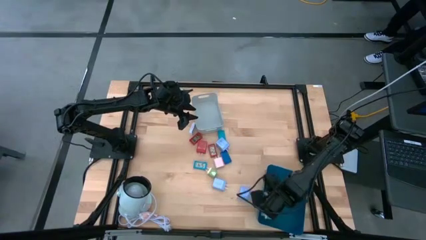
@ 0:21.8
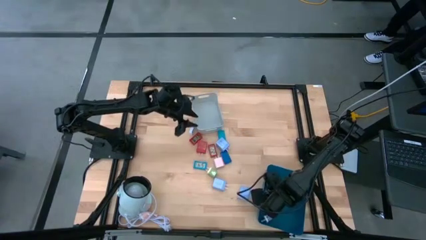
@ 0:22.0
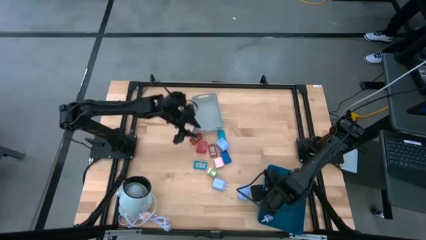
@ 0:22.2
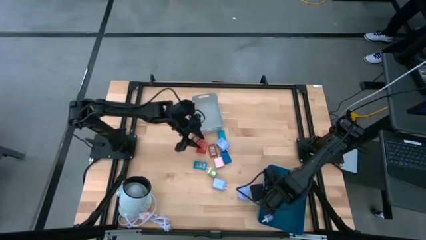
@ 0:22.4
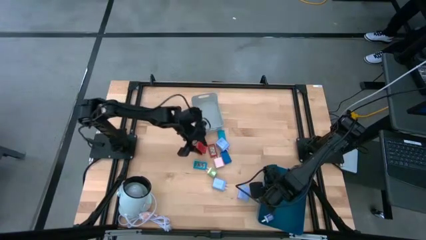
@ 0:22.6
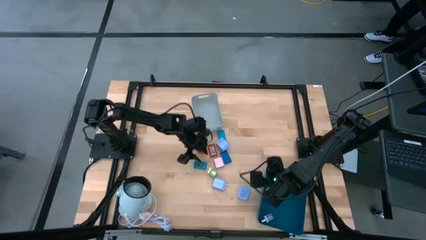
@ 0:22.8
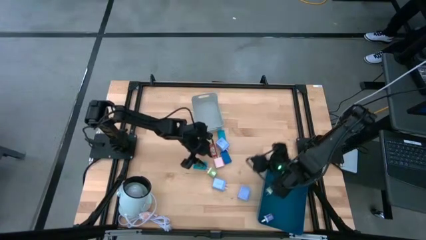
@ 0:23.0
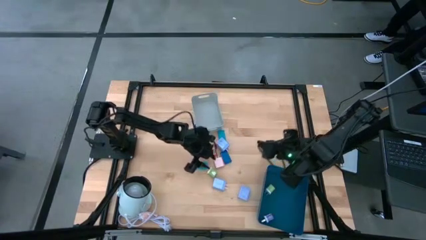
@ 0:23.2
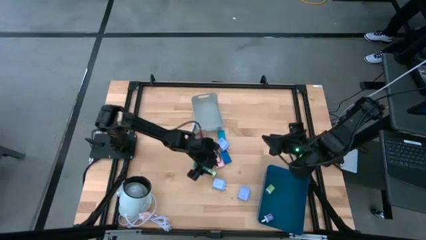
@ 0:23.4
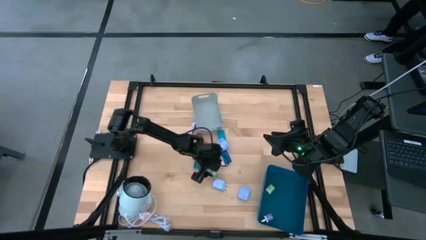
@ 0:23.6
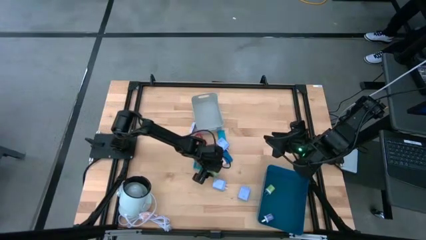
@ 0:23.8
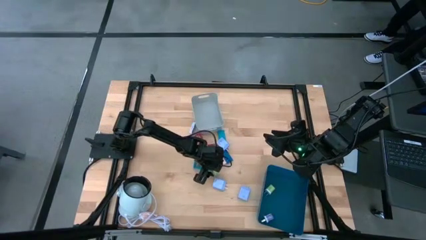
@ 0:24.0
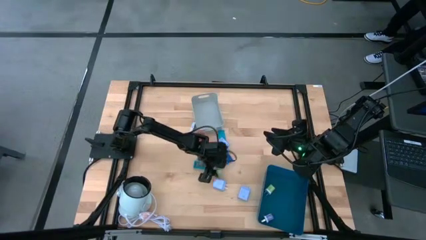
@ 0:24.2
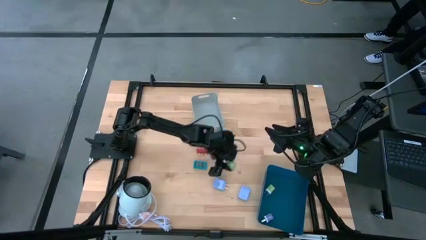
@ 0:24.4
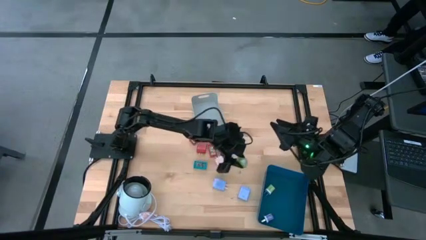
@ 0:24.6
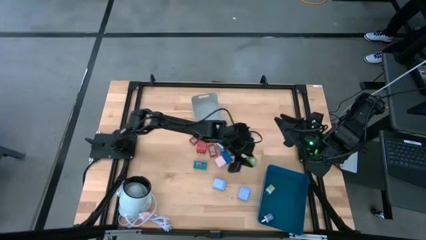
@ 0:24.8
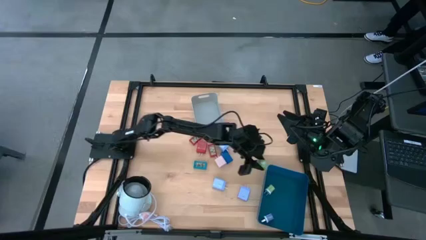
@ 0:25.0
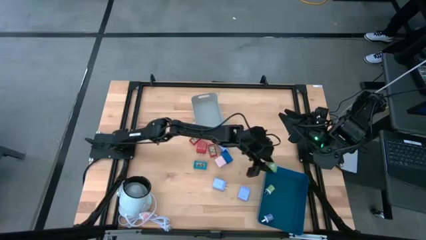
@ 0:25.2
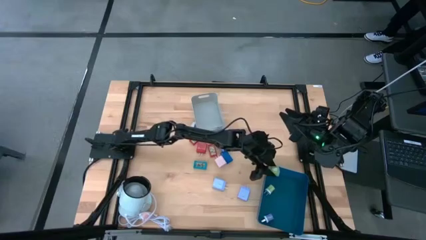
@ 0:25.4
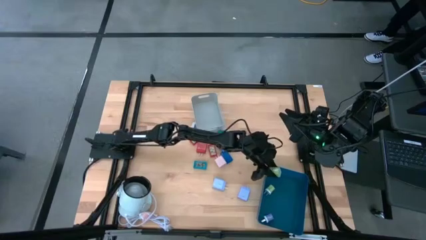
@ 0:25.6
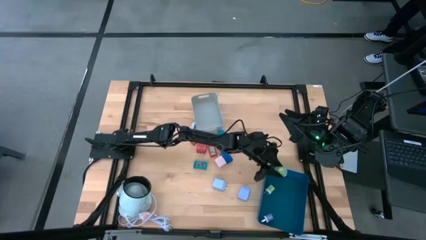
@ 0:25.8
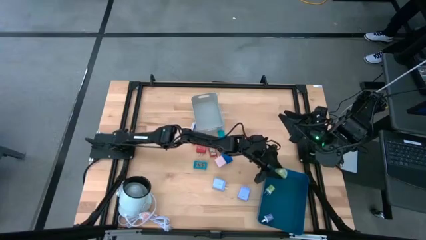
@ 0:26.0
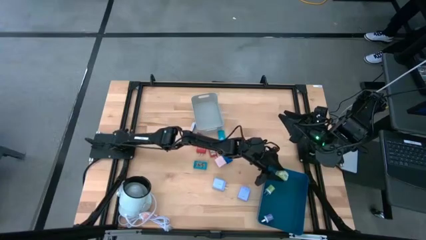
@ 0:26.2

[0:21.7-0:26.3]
Task: Pick & Place Office items
Put the green charger adapter into the blue bin

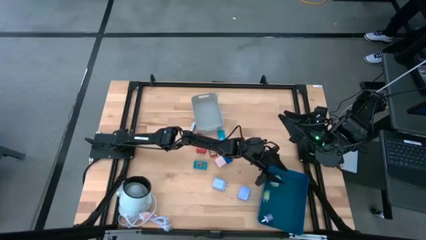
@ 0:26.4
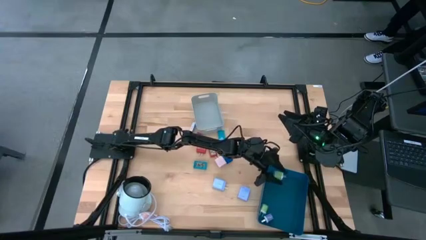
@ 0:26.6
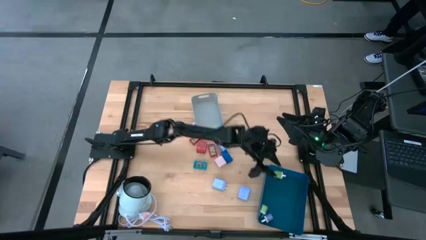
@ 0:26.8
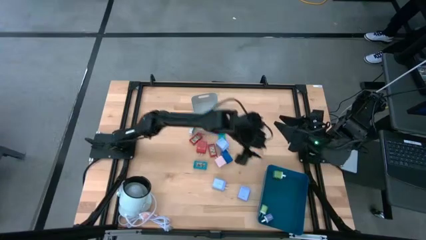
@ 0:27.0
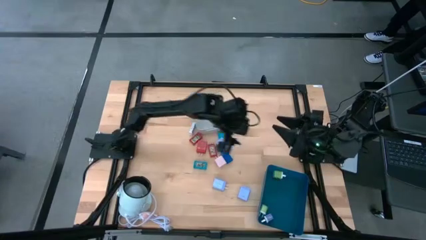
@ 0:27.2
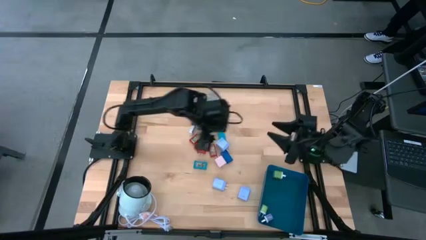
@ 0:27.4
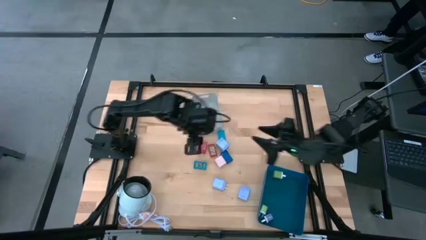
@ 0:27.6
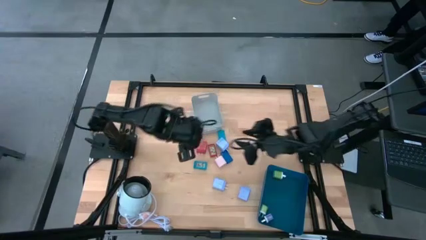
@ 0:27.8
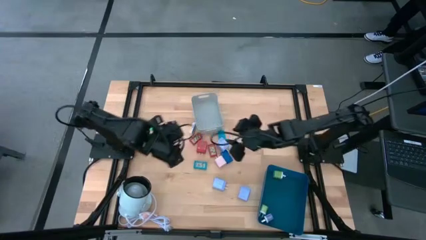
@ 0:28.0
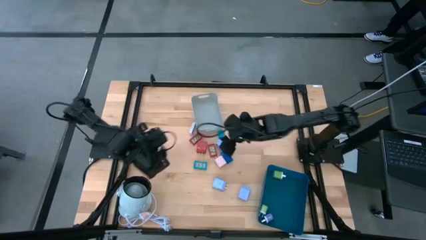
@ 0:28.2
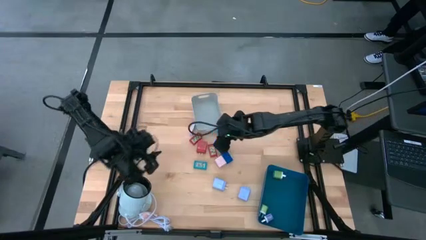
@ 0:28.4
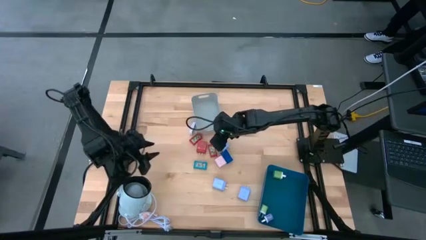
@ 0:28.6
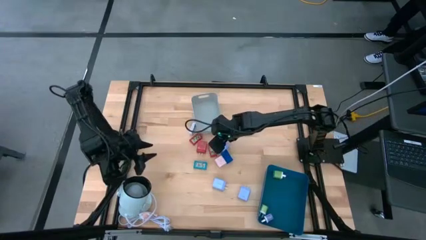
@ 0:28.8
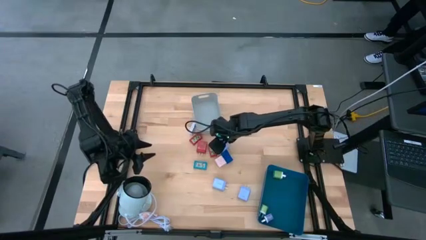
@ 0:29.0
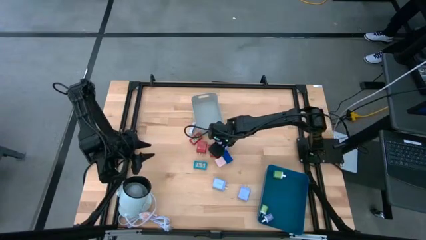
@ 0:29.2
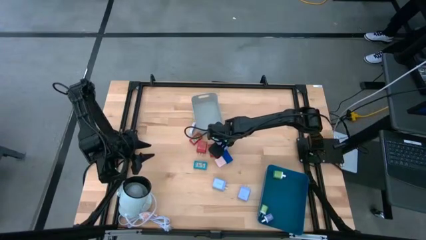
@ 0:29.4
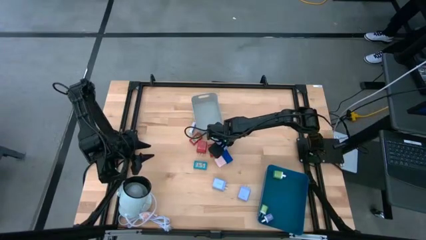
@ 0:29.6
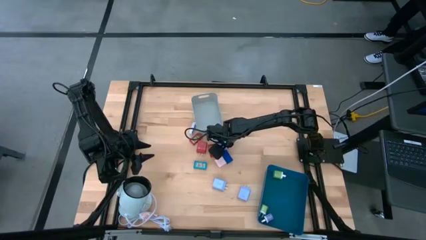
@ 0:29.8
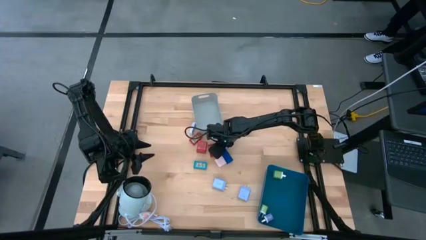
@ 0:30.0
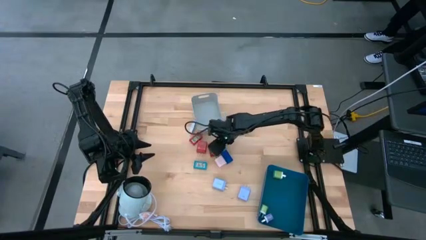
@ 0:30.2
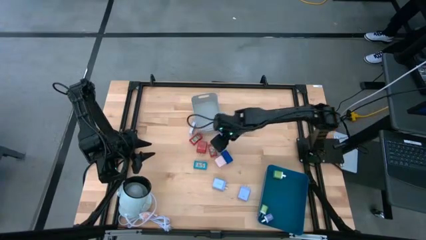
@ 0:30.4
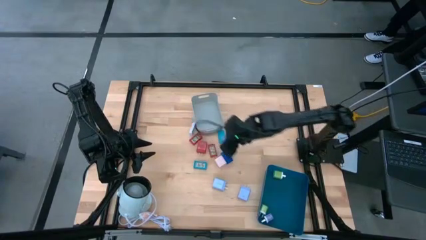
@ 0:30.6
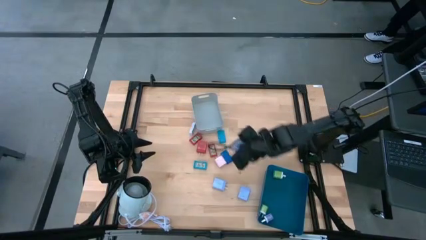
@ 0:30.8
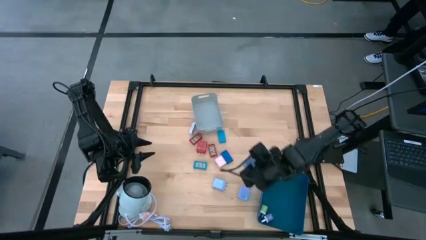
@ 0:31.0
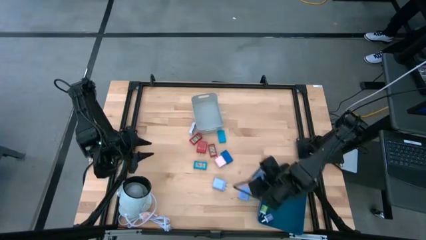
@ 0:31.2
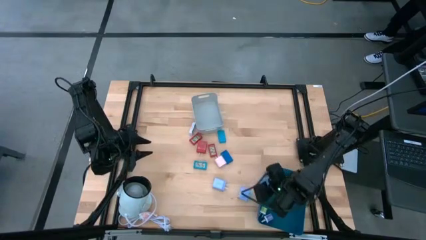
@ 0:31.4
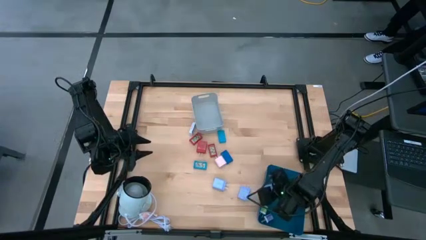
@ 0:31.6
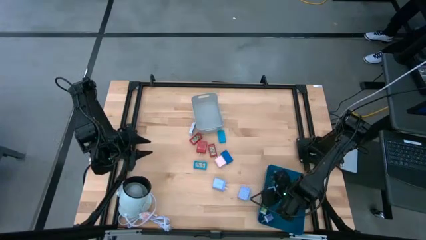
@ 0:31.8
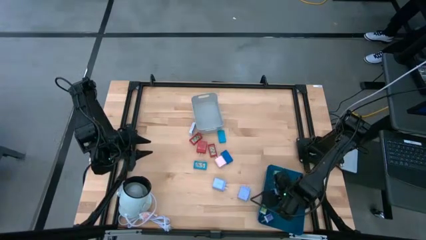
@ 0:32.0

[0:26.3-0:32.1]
Put the top blue charger adapter into the blue bin

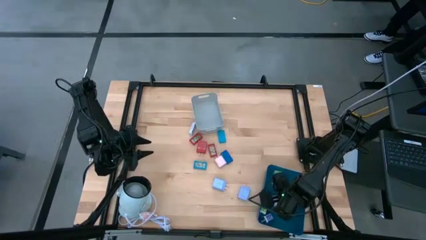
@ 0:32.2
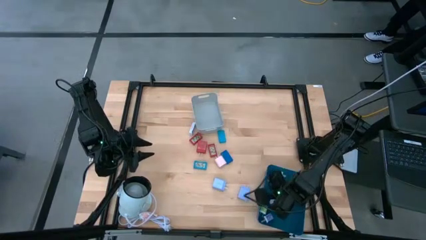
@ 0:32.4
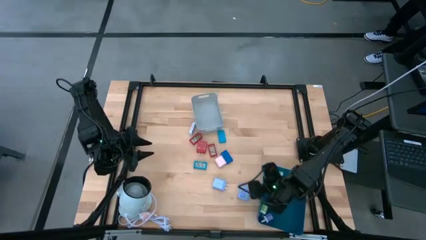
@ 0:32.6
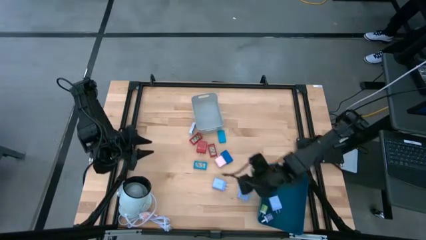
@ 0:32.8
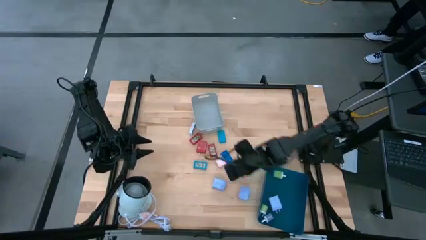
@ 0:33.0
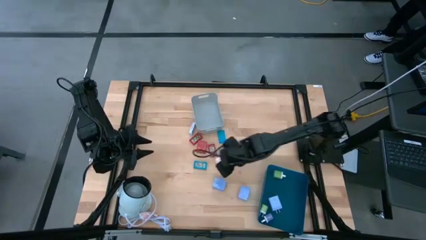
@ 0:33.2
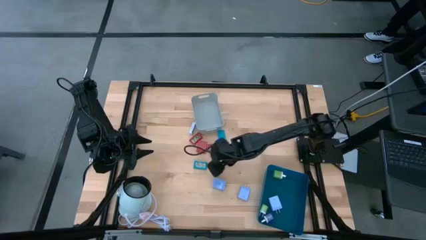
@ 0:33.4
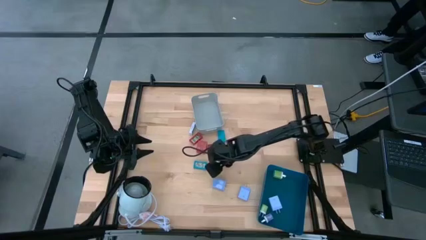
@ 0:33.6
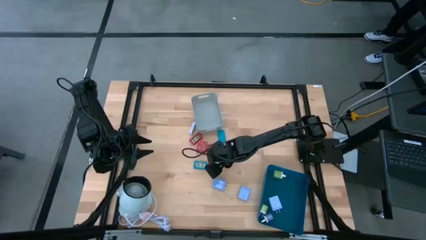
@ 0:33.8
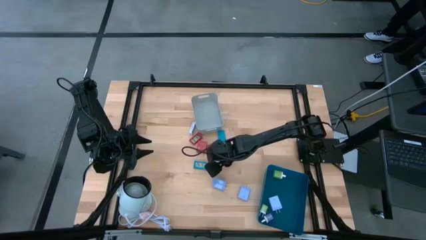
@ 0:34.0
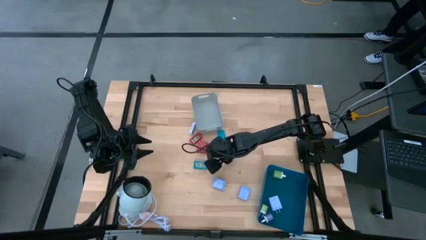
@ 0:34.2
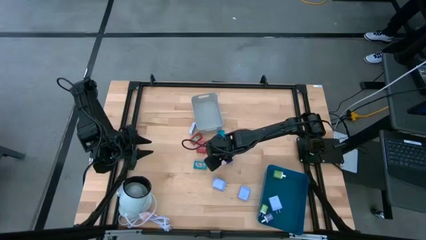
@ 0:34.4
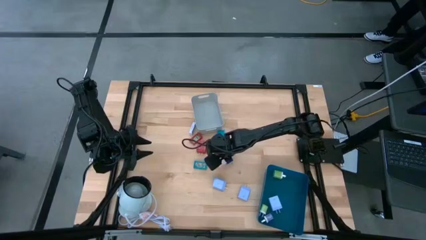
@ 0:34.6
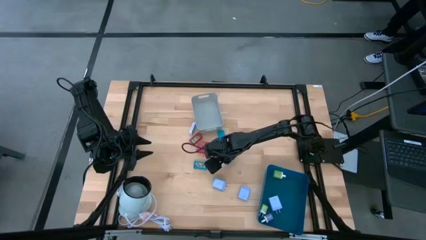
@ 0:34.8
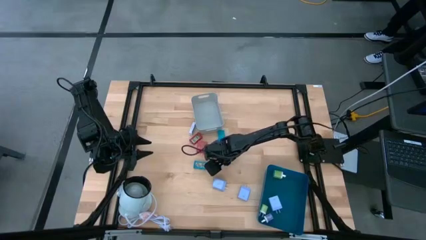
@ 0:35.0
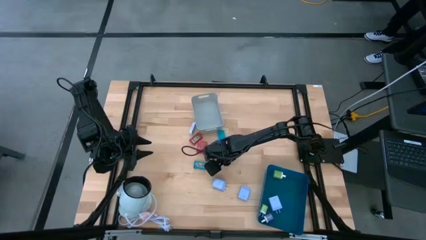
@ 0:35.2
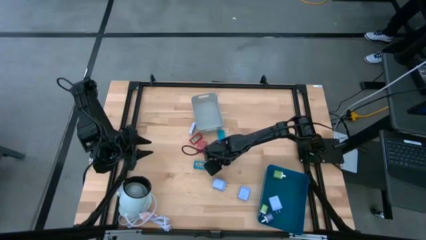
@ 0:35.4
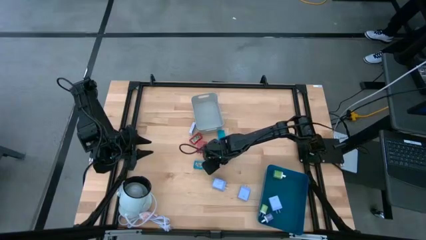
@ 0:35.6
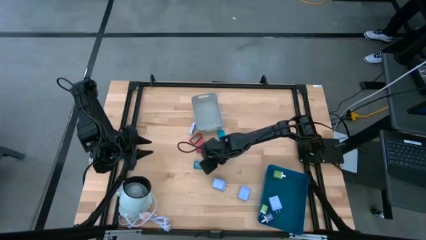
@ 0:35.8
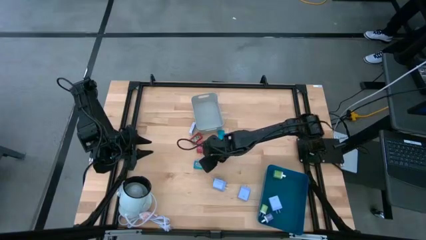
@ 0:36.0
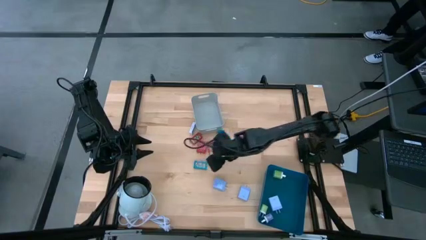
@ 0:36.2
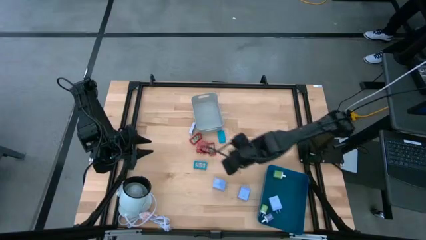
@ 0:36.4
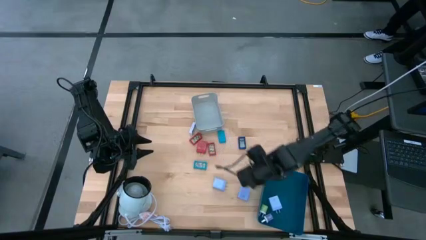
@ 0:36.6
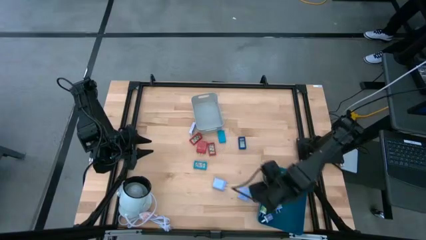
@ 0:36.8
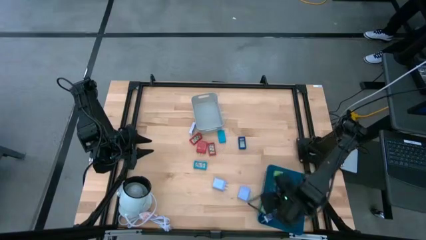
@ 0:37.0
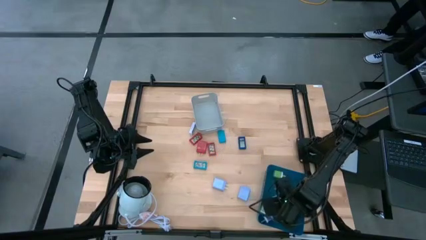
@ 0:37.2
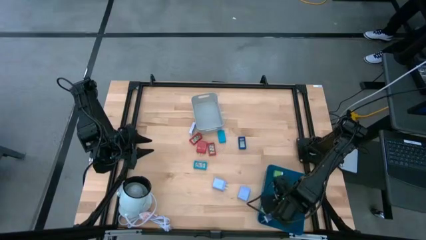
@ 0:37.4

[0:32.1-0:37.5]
Put the pink charger adapter into the blue bin
